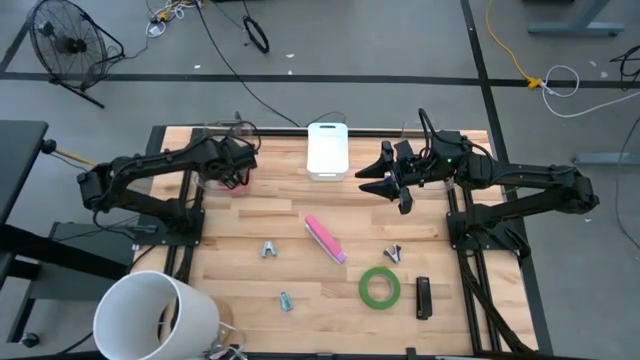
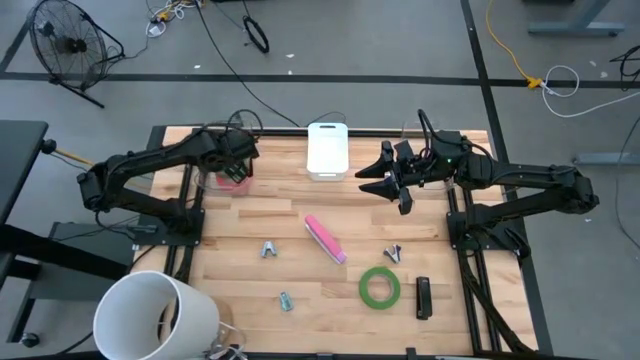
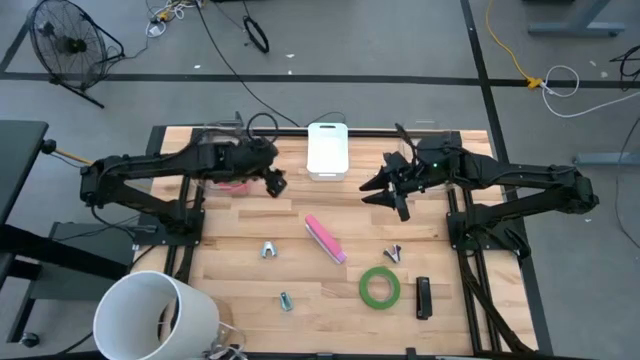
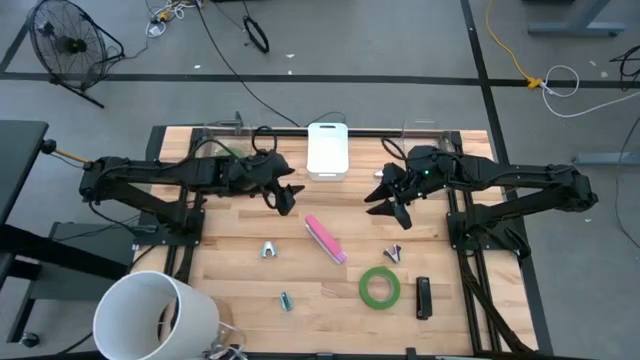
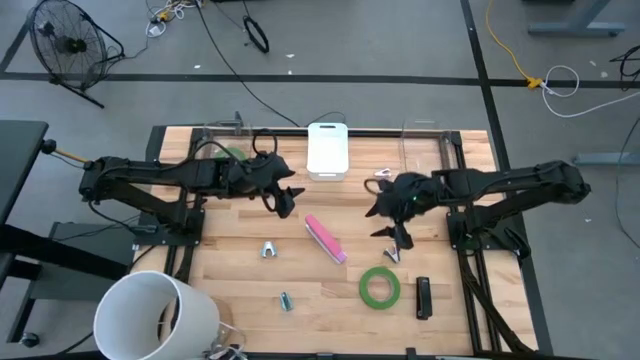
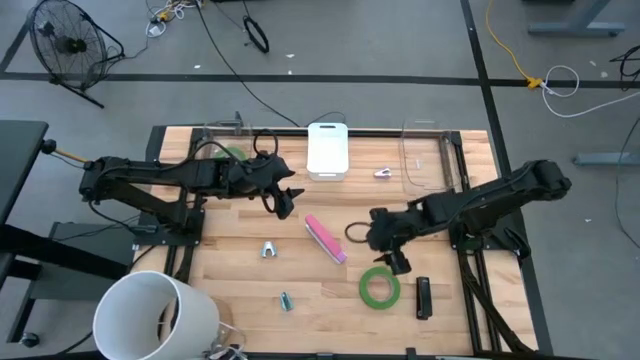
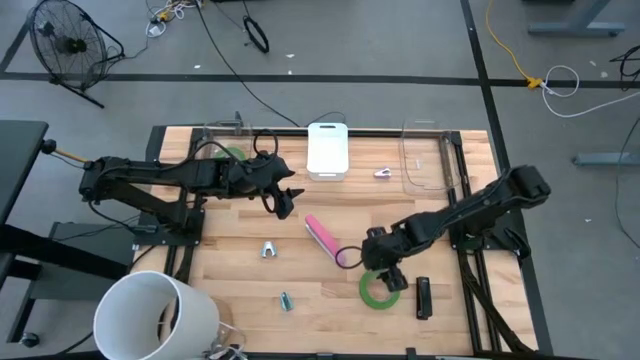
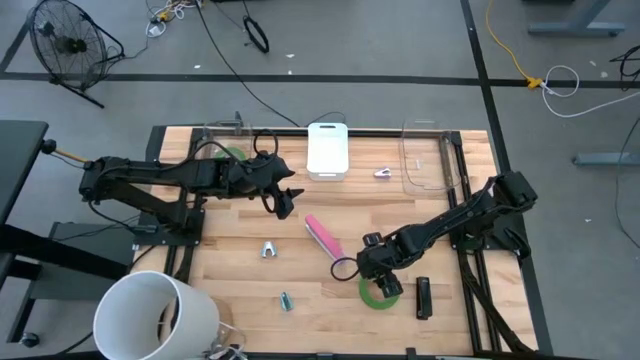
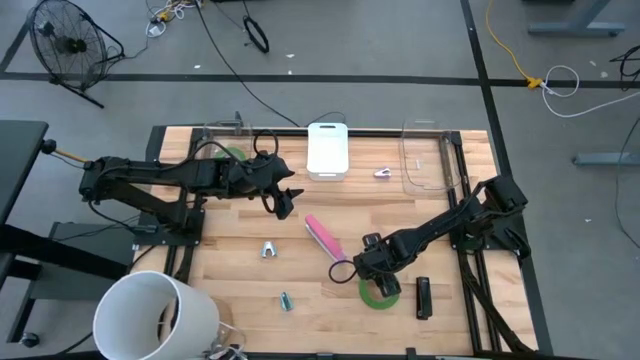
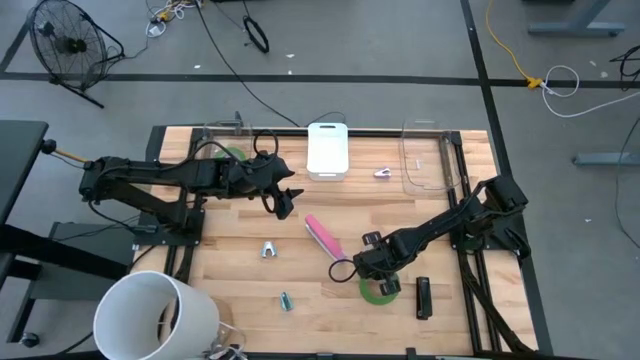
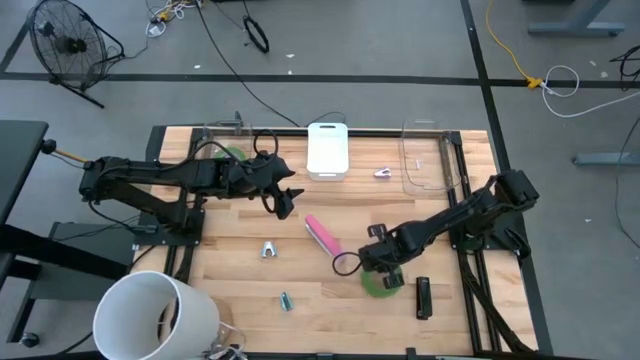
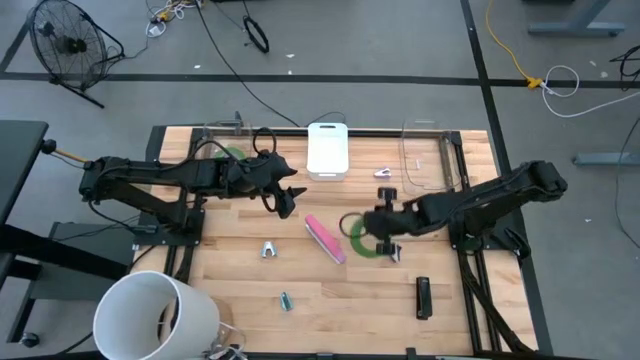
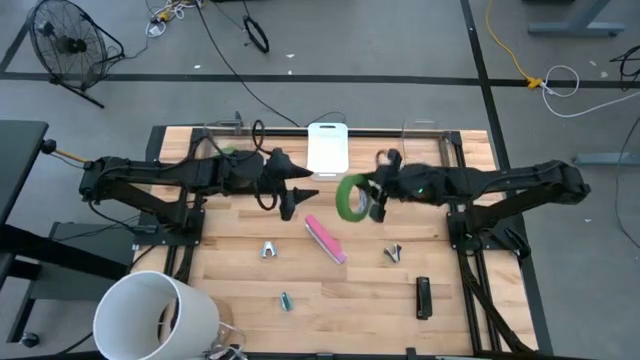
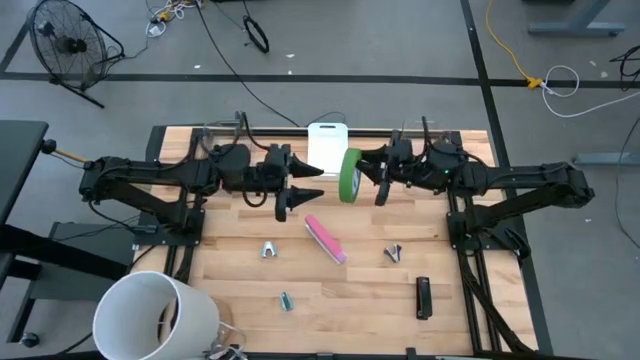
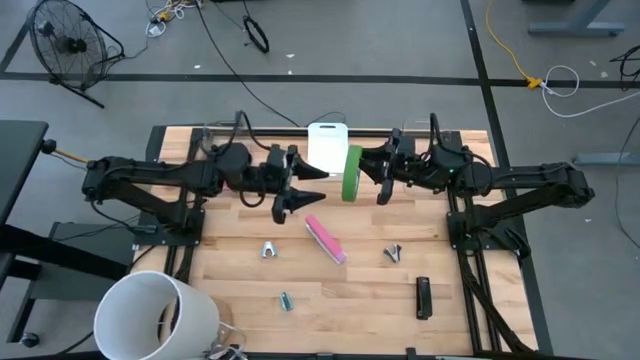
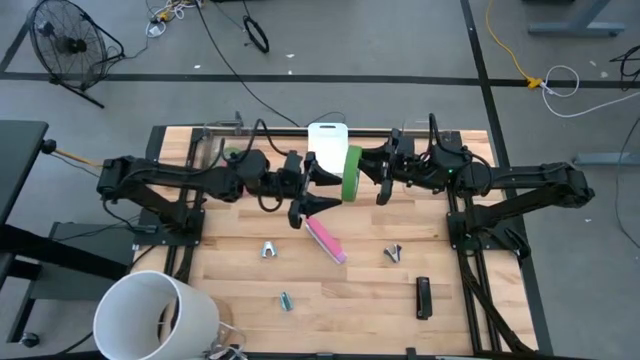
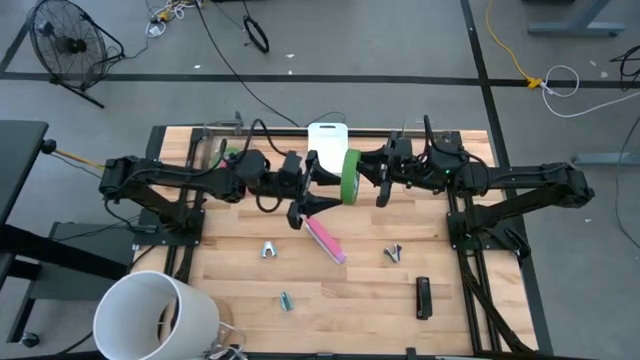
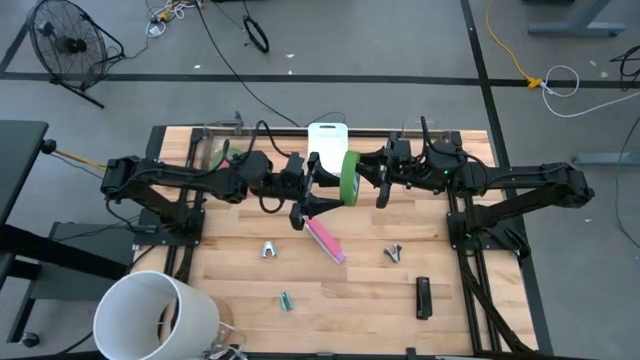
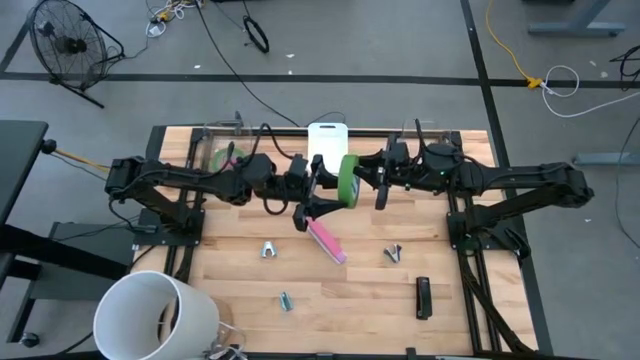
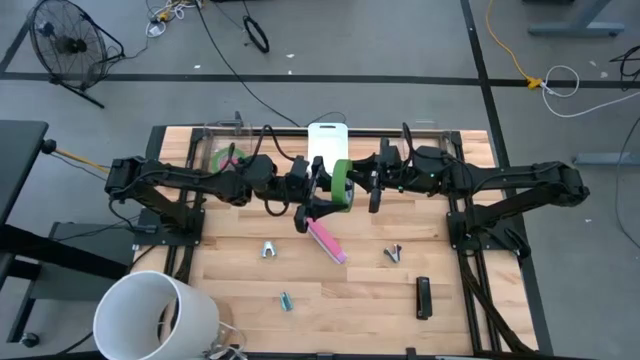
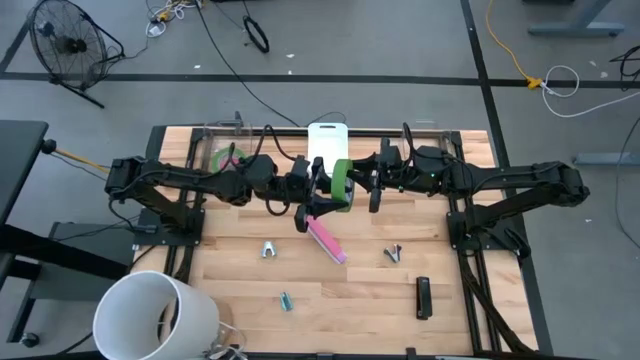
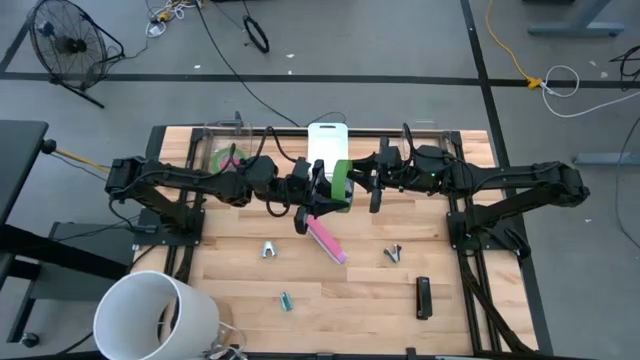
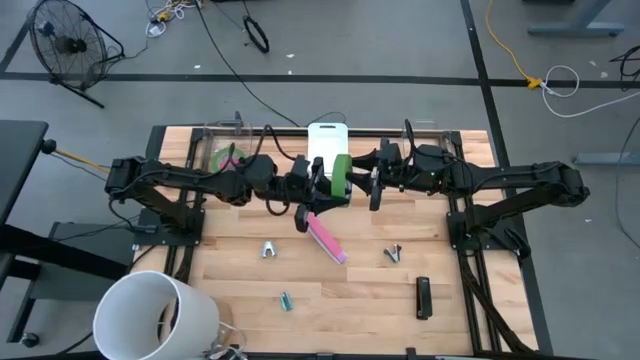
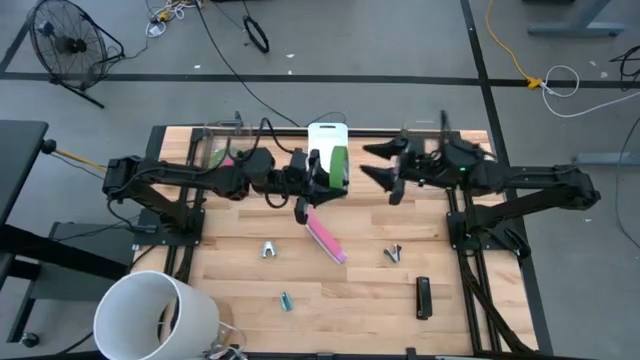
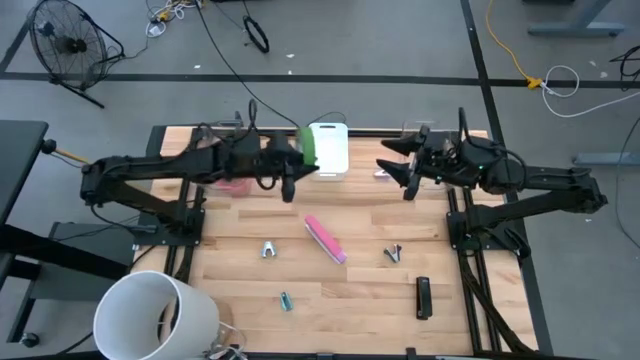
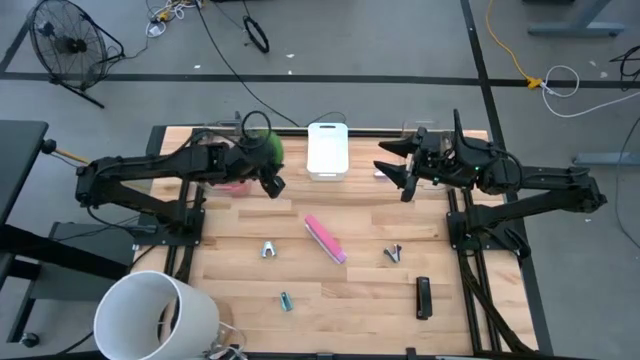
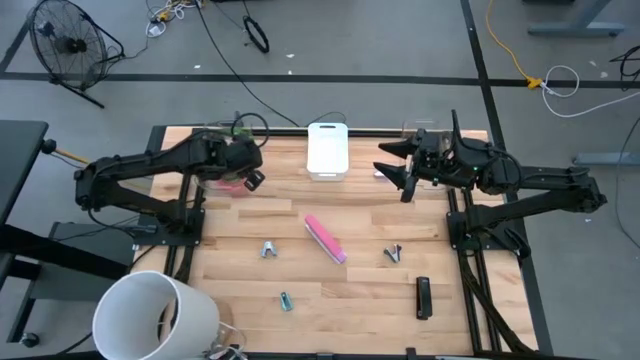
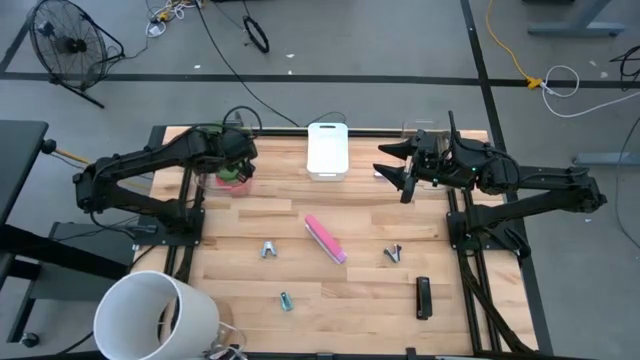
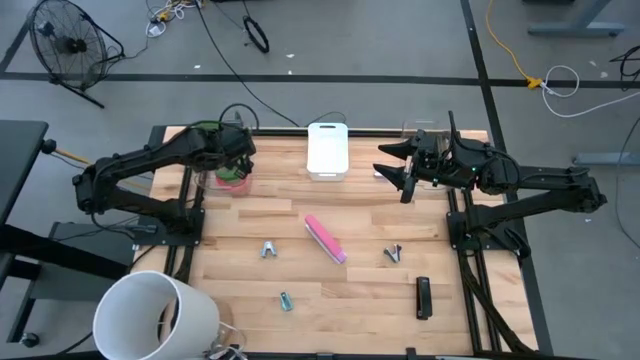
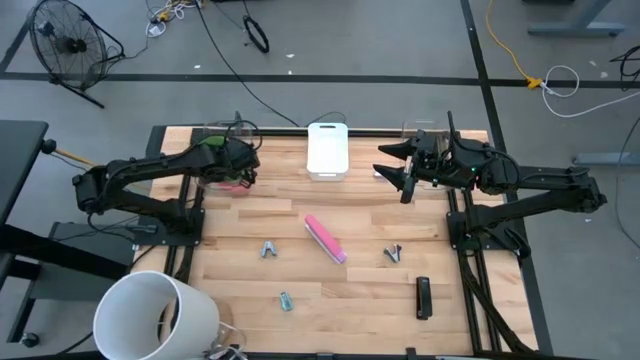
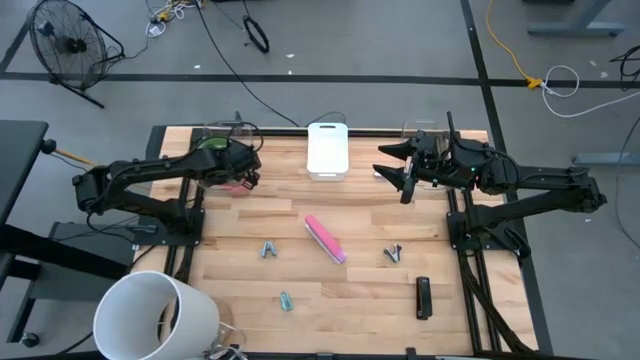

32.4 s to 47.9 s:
Task: Pick and place Stapler, Stapler remover, tape
Put the green tape into the left transparent bin

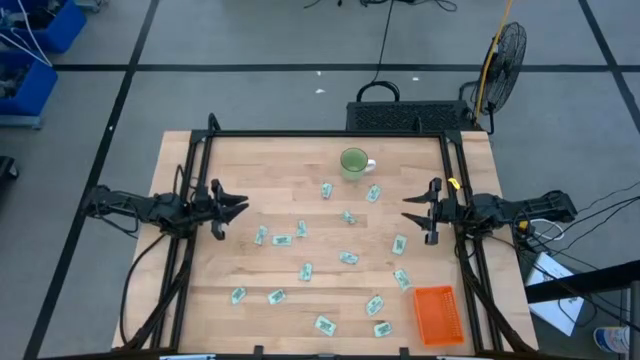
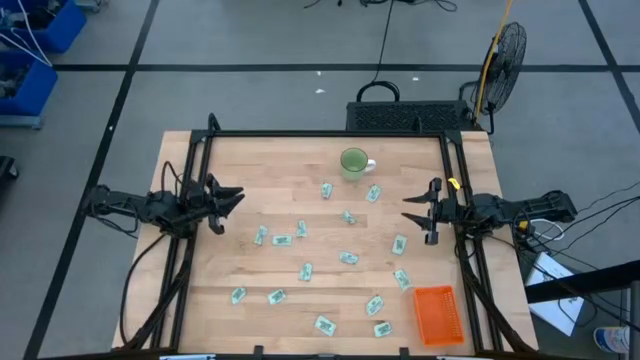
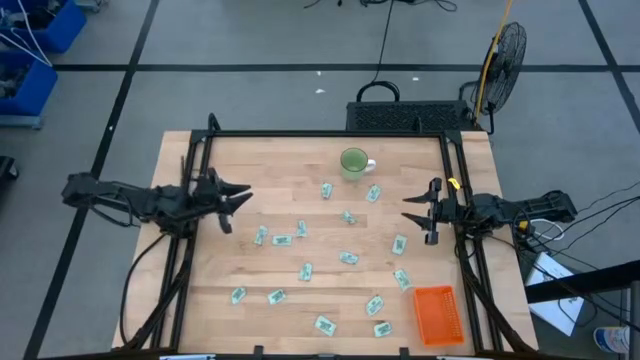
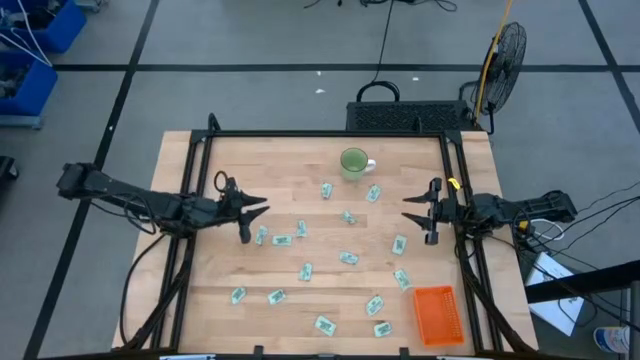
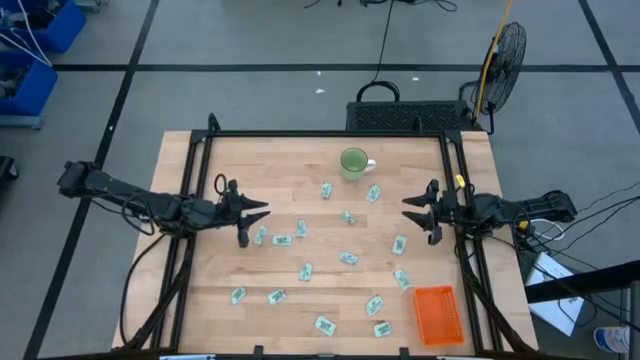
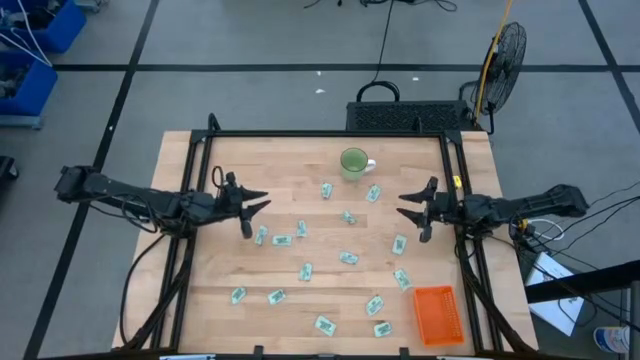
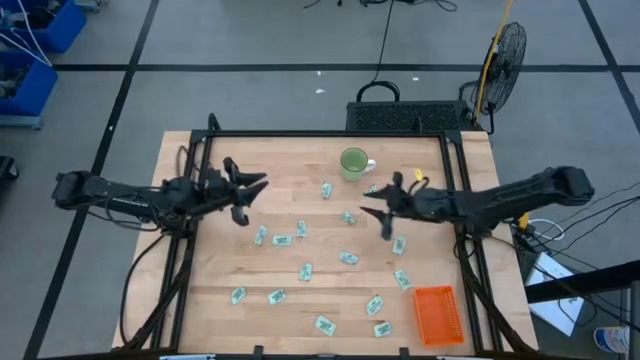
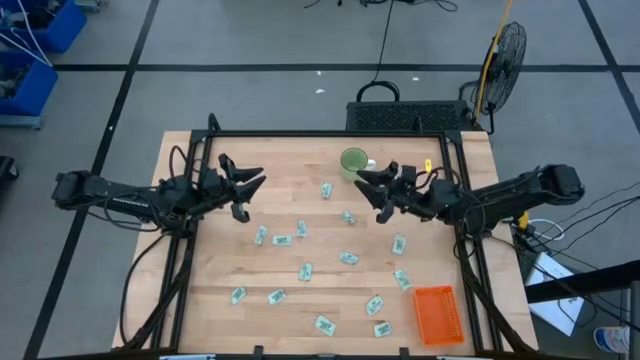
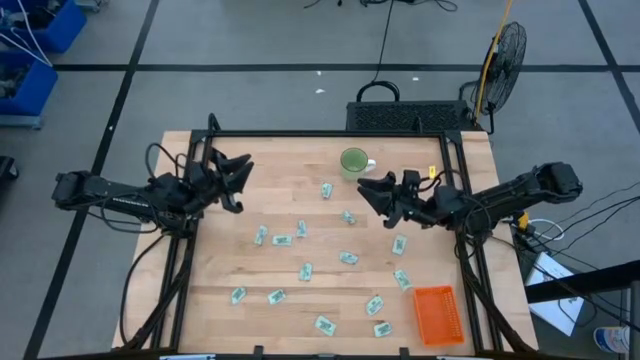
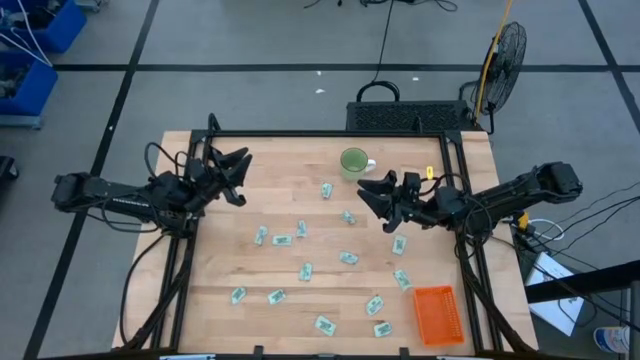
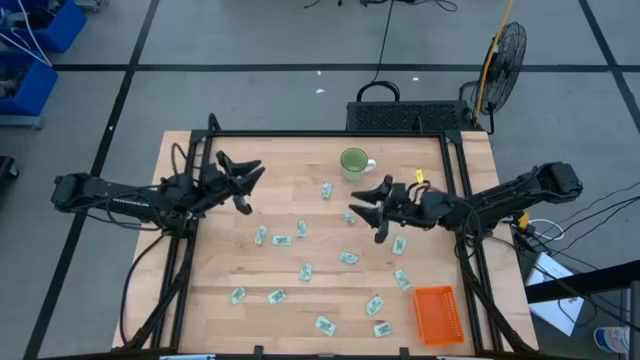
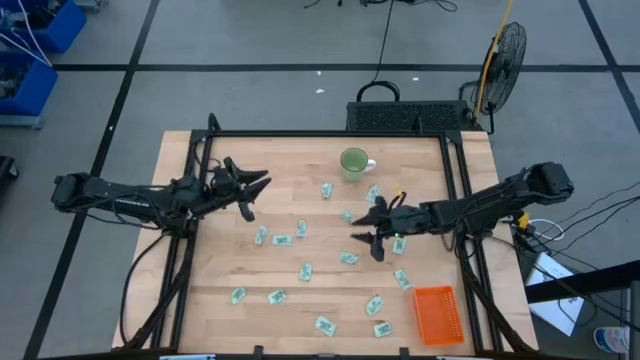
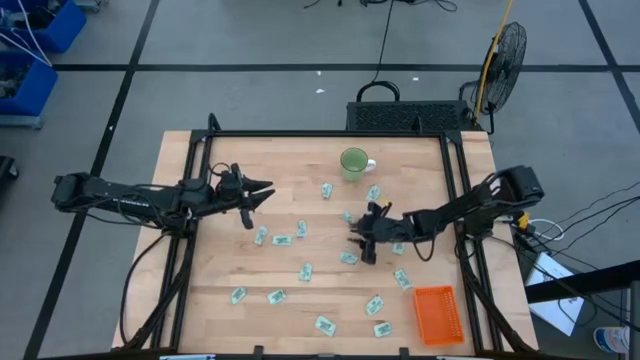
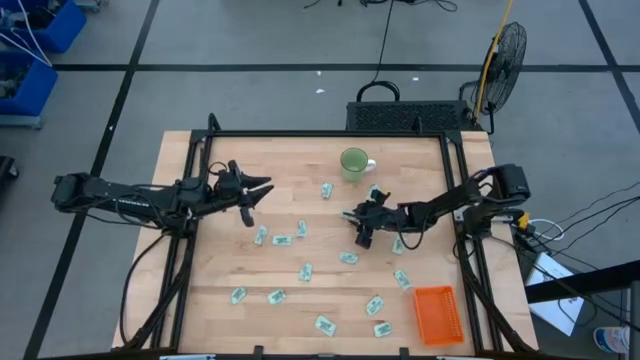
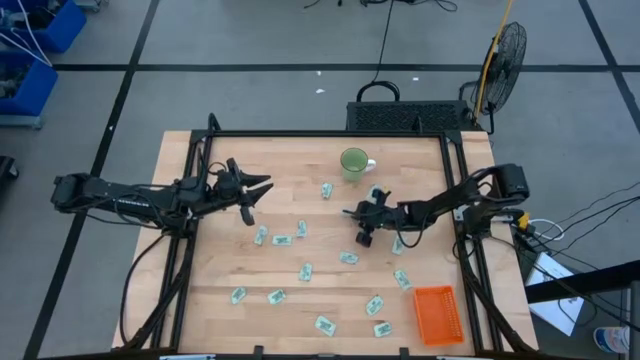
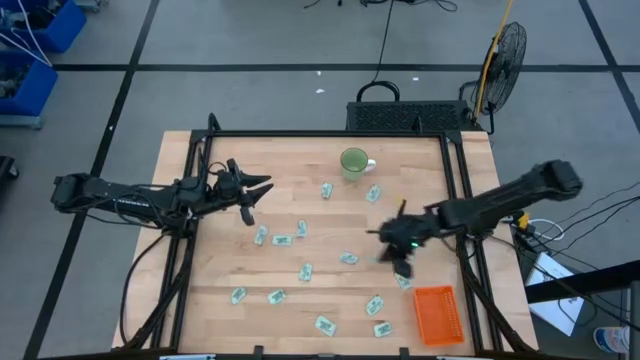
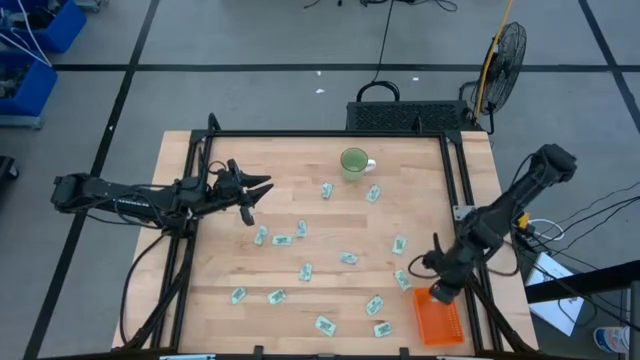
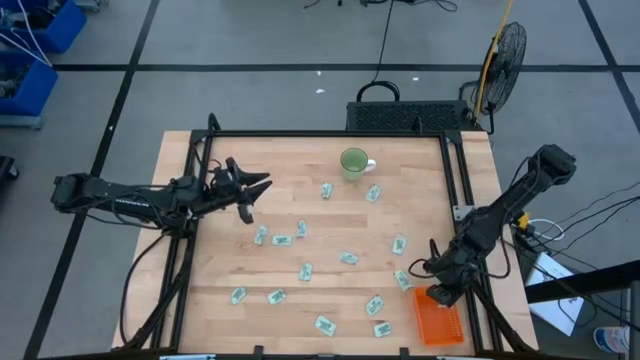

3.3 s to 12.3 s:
Task: Pick and place Stevia / Truvia into bins
Put the stevia packet into the orange bin
